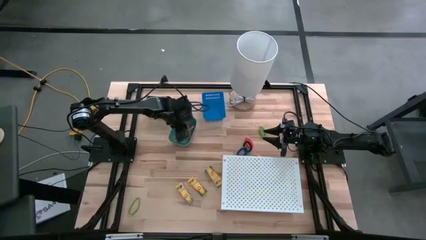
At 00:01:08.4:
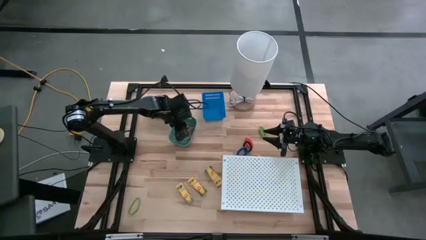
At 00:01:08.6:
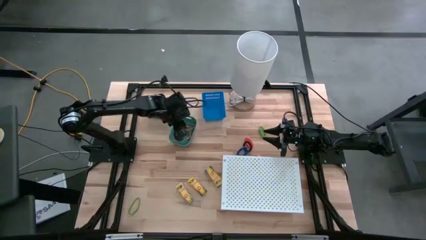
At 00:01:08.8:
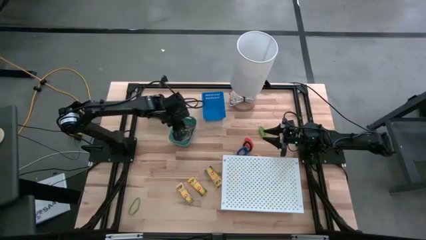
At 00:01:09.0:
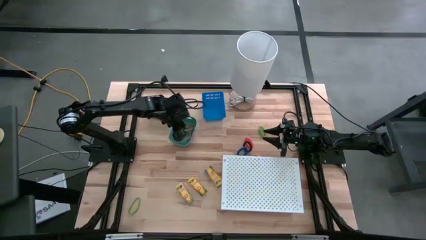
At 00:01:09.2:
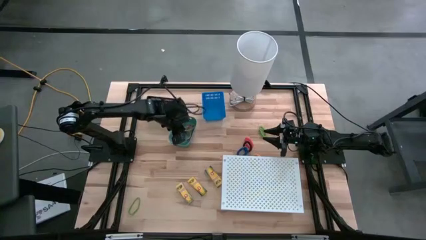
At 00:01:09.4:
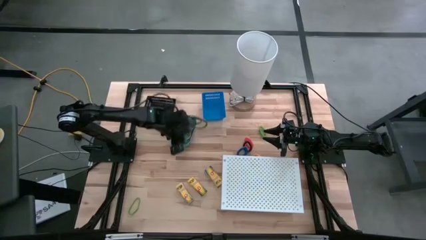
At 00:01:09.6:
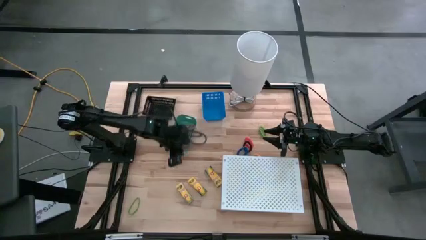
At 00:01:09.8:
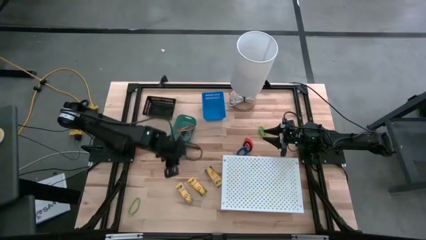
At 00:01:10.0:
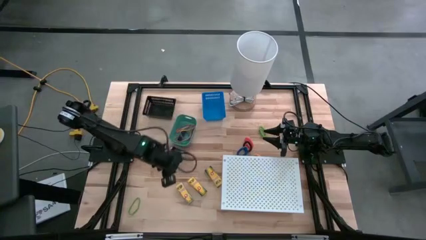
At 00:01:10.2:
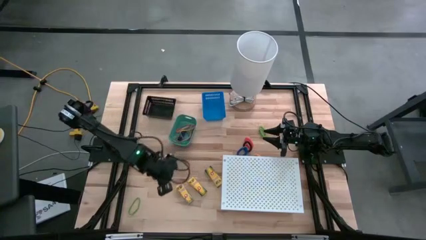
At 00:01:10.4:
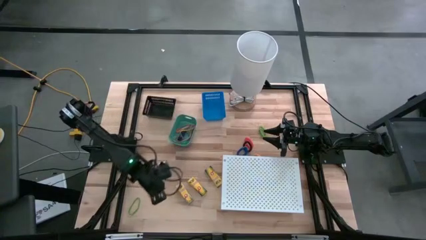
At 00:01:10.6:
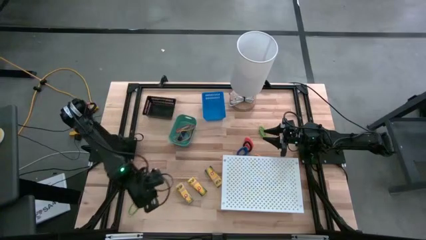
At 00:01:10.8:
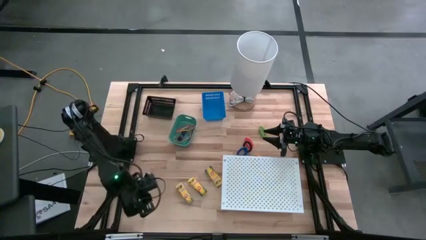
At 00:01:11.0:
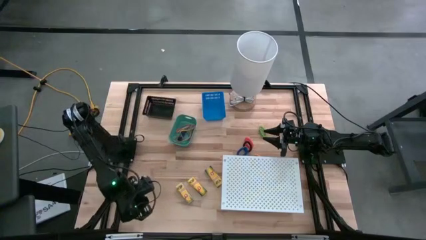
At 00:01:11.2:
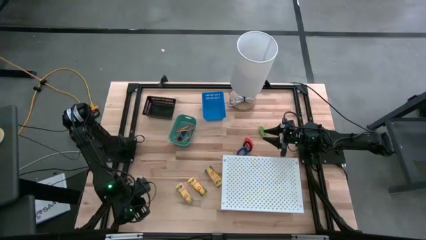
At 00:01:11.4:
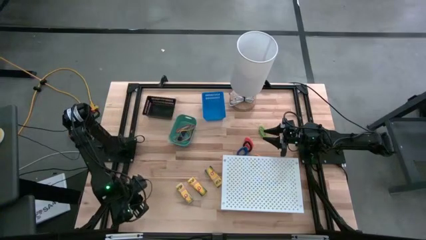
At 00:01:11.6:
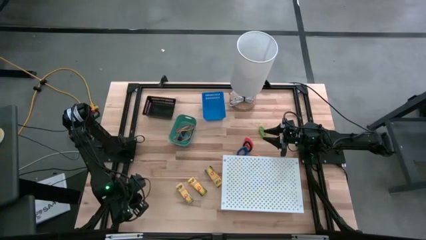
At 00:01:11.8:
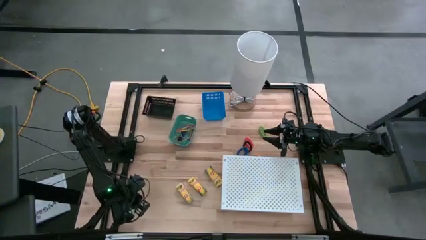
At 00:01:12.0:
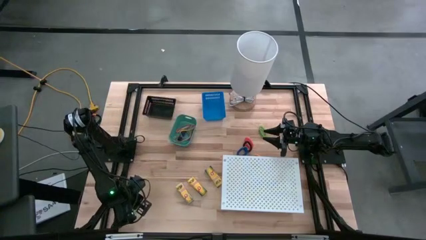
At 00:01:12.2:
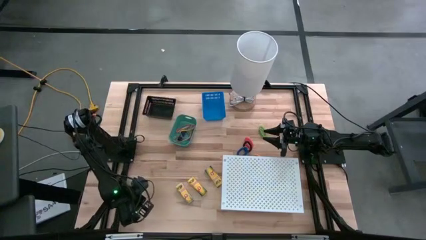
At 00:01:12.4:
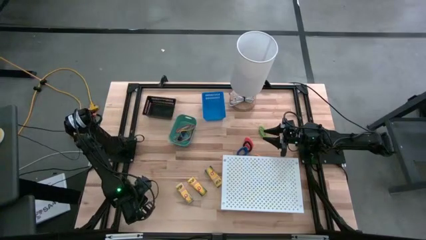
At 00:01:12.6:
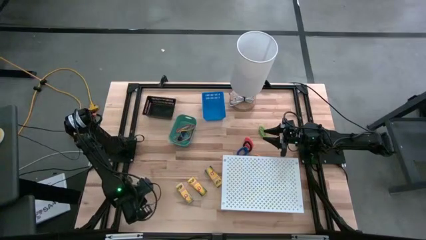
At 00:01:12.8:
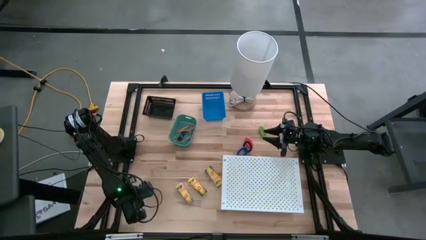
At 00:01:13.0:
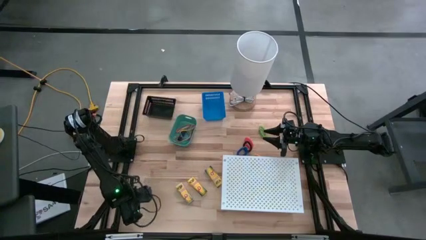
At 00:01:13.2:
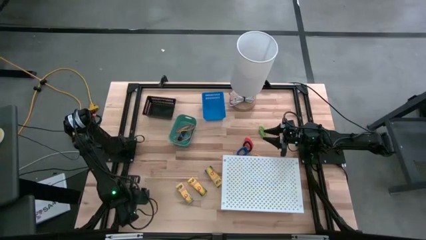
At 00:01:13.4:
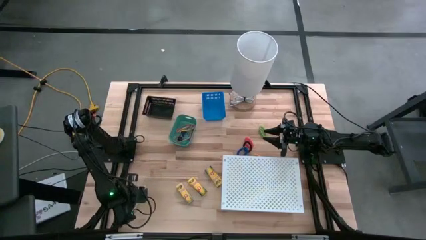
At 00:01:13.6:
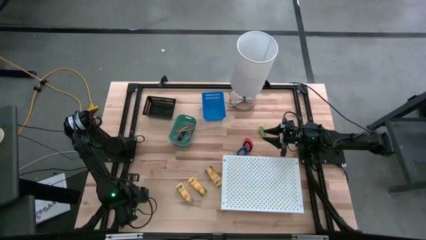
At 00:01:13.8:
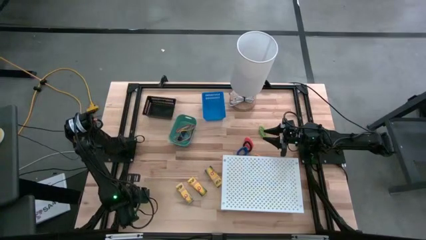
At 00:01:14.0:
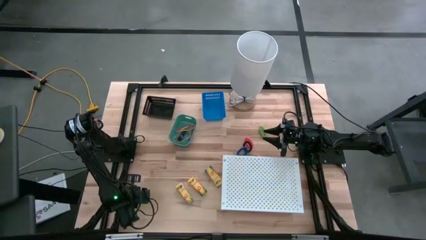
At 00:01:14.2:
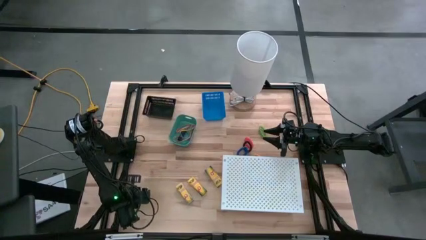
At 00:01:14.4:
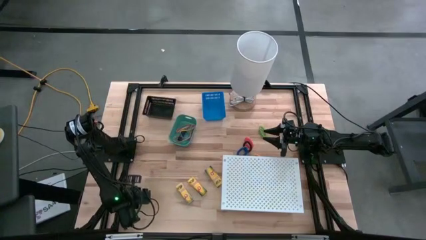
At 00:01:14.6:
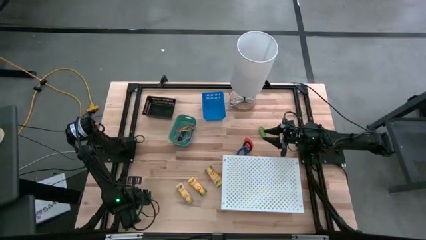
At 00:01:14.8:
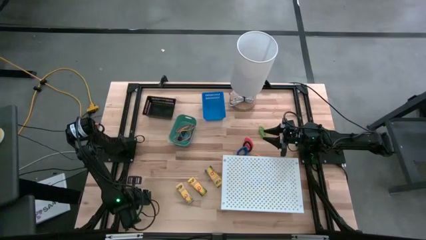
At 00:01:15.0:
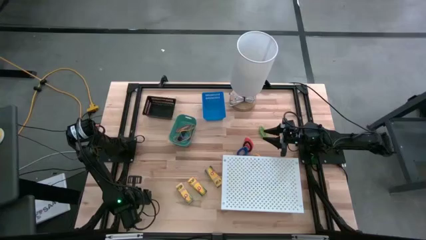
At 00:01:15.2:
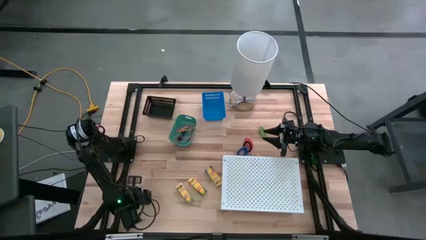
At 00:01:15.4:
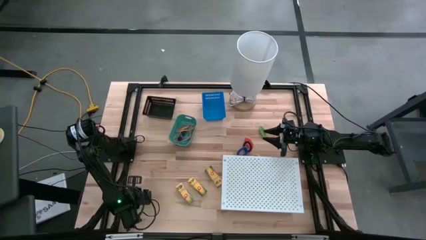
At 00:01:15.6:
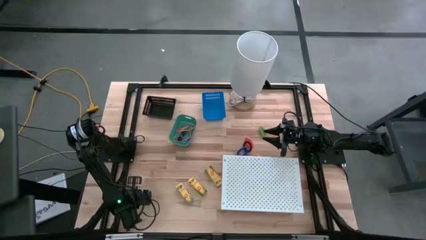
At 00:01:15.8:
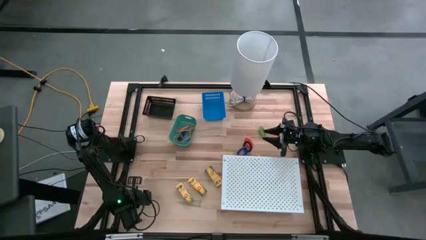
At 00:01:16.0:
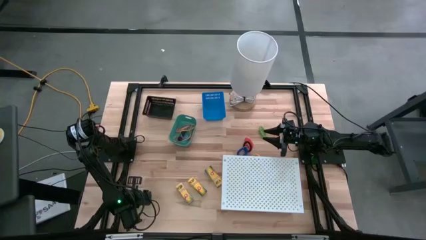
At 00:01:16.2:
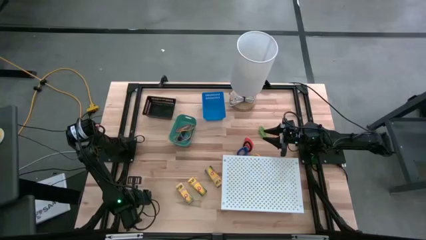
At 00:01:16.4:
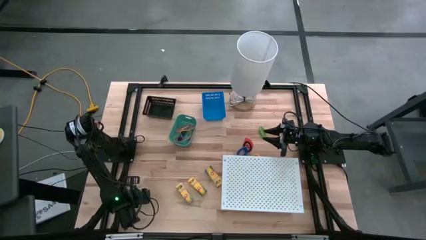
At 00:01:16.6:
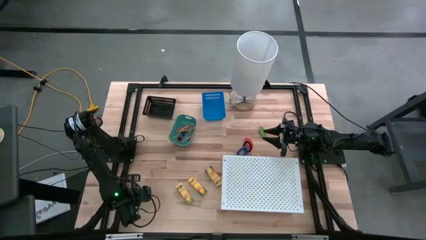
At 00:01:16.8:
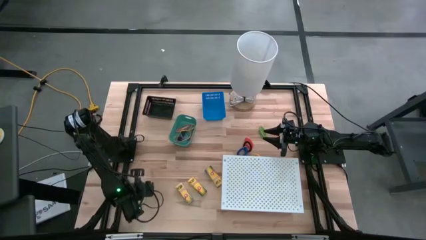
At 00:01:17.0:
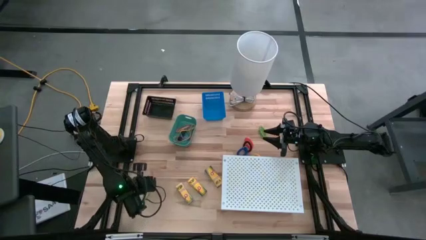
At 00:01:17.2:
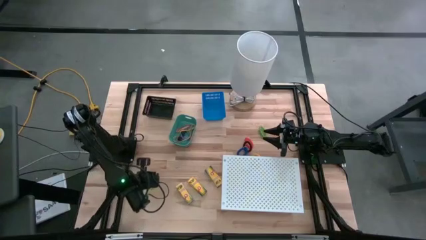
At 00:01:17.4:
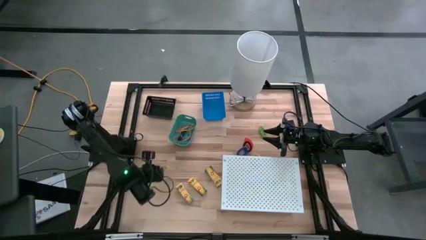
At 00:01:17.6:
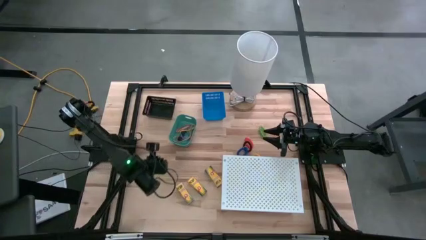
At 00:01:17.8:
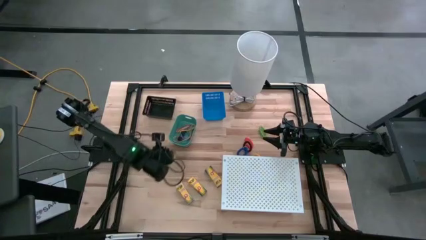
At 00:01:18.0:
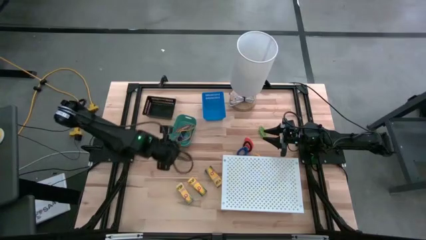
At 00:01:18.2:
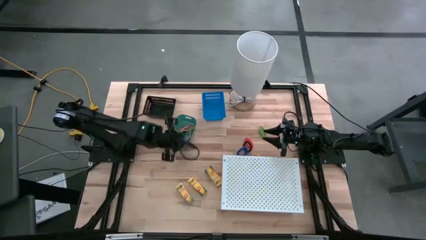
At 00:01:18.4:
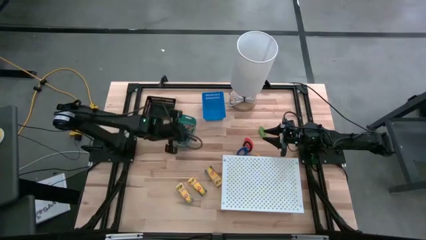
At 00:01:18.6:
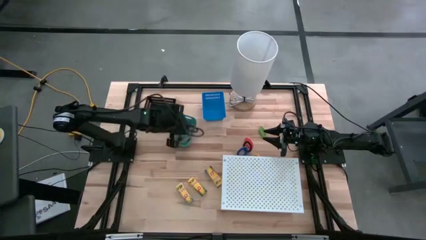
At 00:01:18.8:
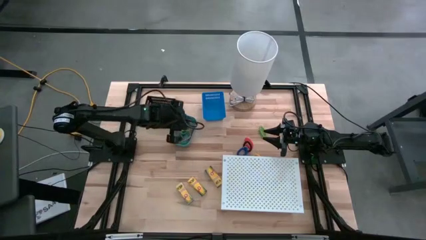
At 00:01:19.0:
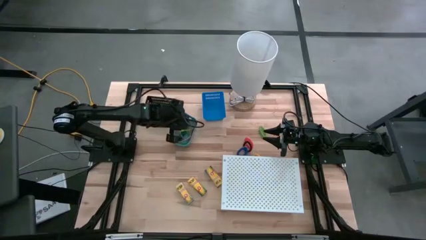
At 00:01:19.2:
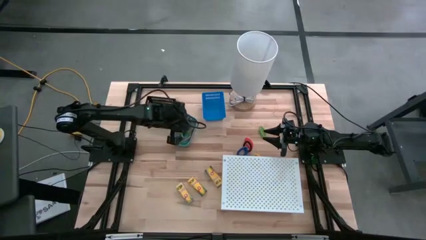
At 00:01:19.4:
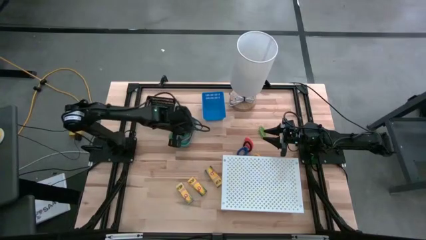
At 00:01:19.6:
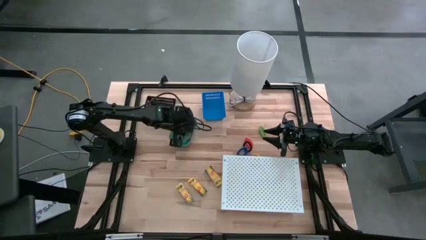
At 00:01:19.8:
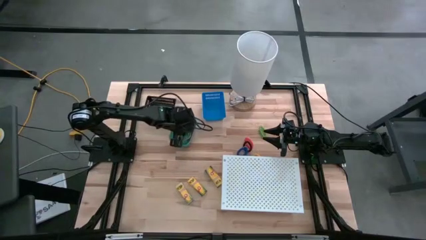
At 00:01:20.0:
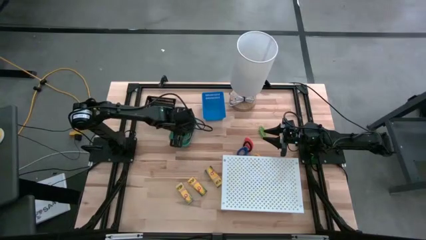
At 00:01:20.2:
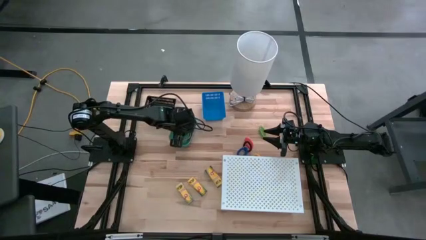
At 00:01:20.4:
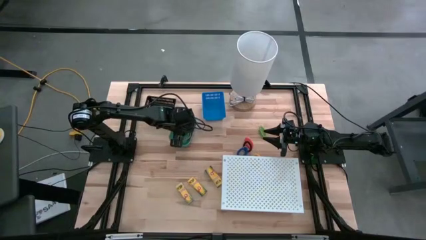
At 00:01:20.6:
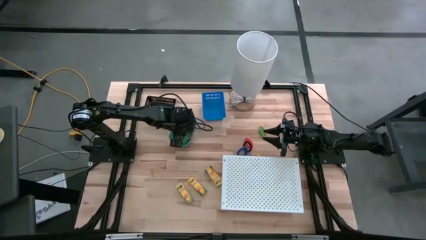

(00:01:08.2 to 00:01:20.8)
Task: Pick & Place Office Desk Supplies
Put the green rubber band into the green bin

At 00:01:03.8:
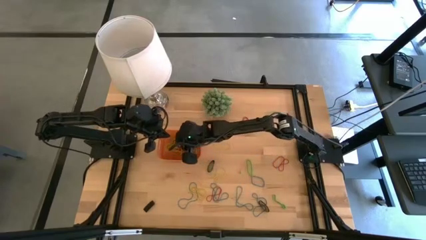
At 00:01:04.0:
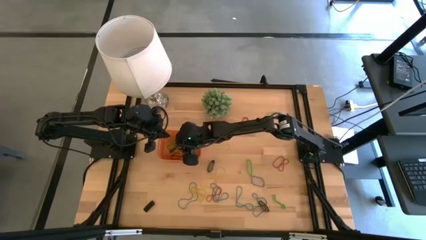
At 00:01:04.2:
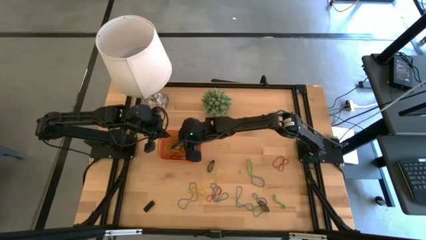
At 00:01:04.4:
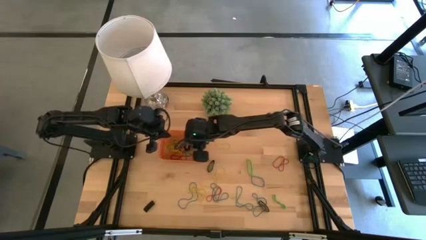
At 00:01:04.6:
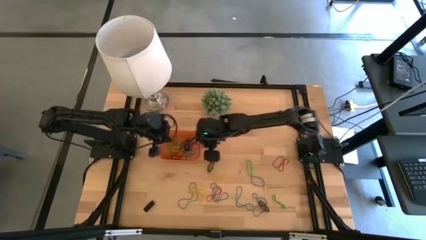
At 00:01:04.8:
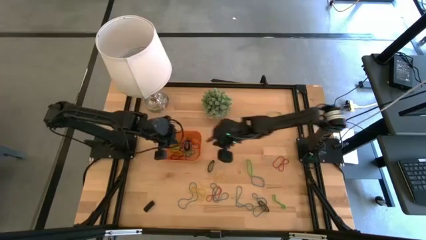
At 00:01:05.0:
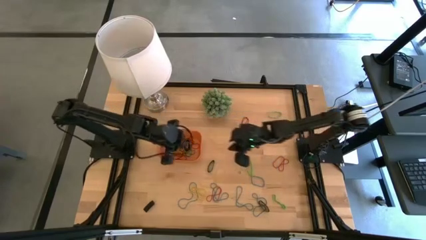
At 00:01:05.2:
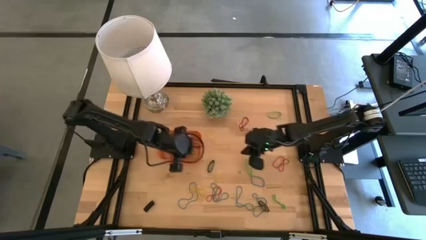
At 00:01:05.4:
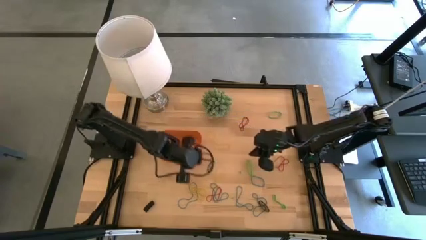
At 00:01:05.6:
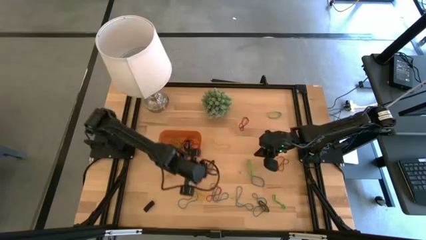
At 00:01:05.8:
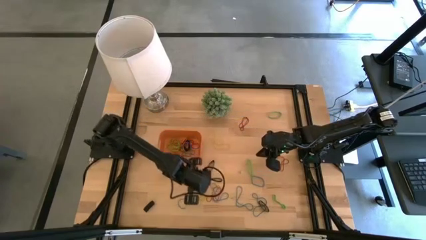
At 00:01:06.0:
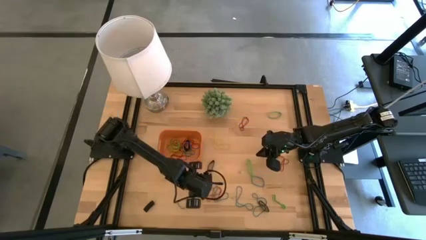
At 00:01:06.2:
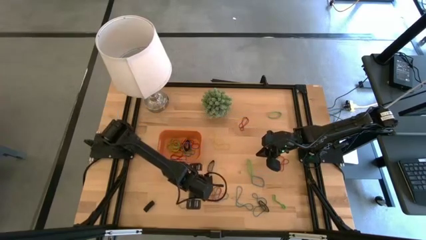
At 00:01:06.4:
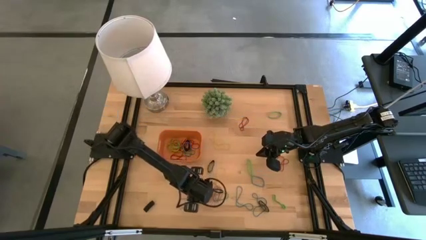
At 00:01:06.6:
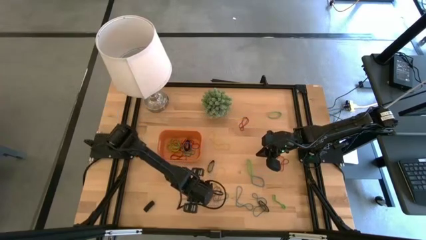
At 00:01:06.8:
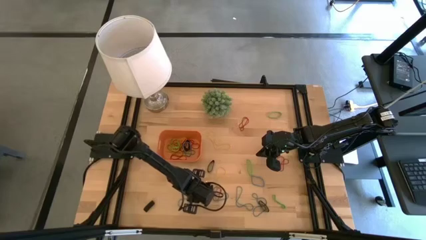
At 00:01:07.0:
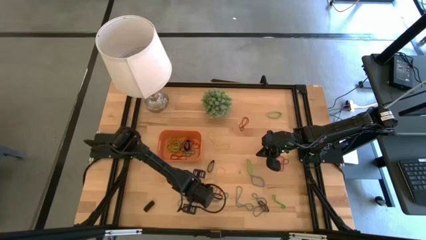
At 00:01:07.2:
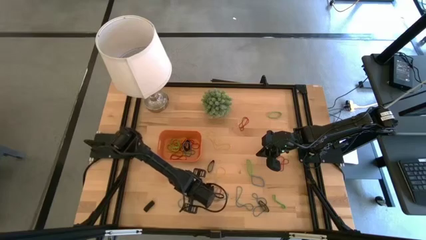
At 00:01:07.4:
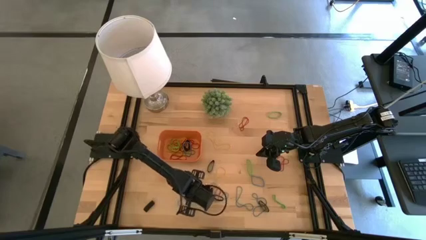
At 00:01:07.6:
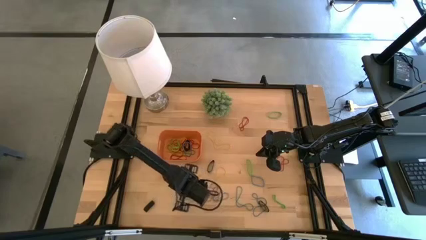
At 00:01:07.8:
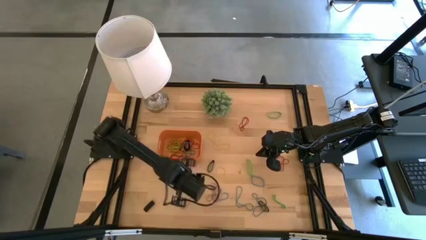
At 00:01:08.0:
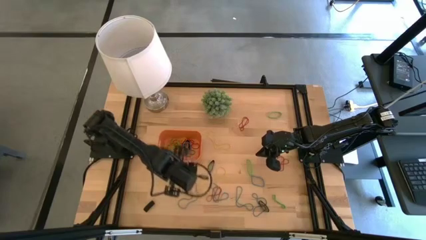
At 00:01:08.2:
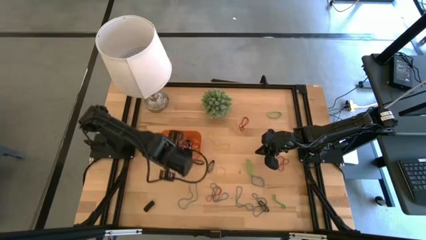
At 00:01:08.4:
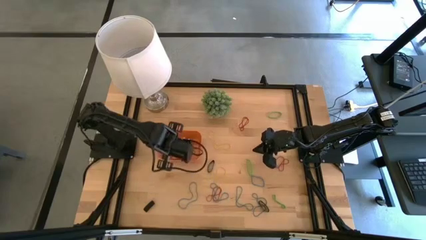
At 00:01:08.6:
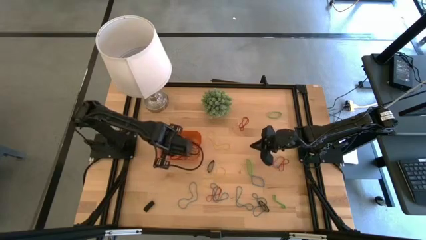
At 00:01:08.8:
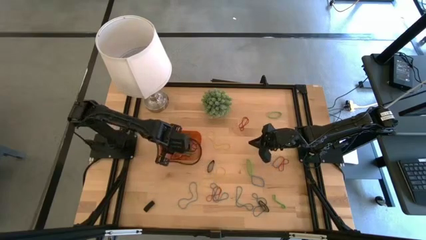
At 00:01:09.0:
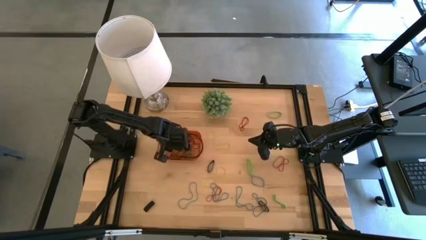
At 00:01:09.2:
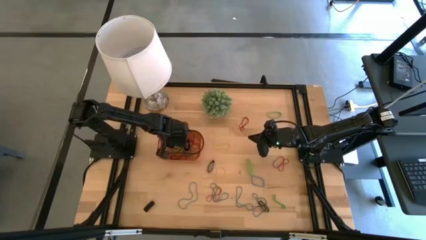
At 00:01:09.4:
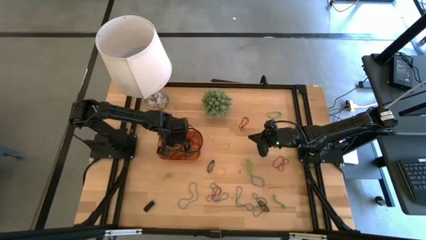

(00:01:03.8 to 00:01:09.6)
Task: Pick and place rubber bands into bin
Put the yellow rubber band into the orange bin
